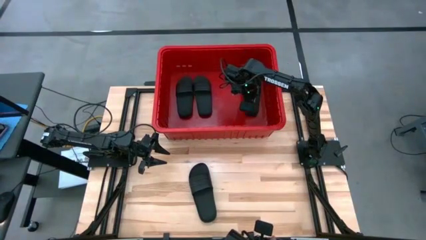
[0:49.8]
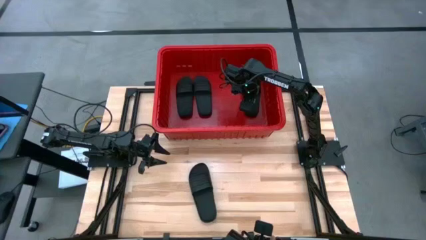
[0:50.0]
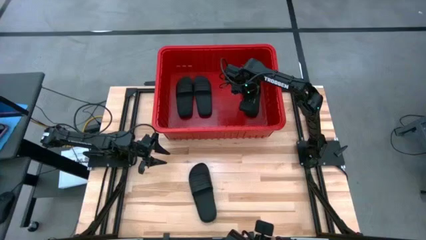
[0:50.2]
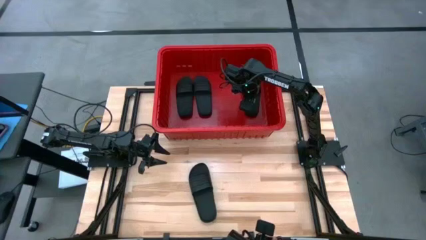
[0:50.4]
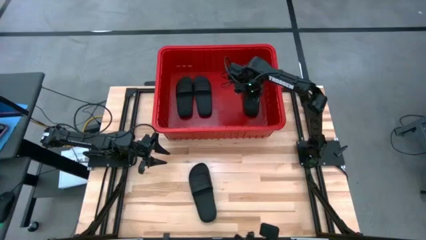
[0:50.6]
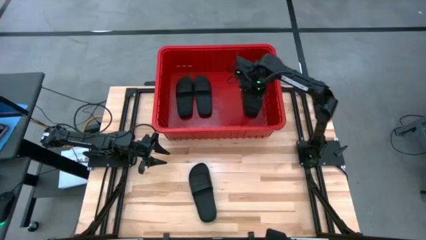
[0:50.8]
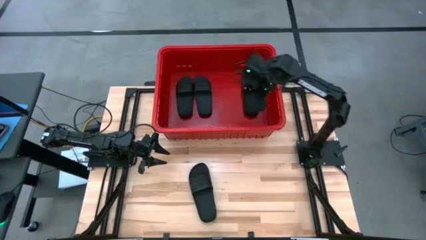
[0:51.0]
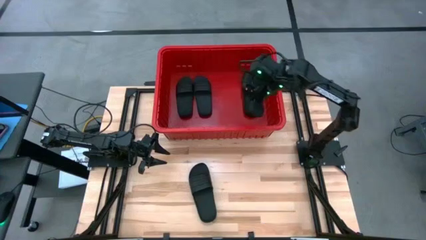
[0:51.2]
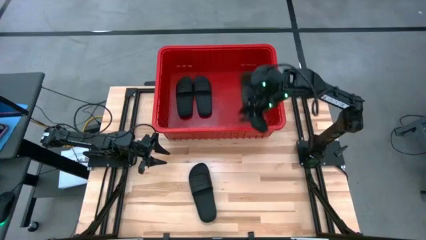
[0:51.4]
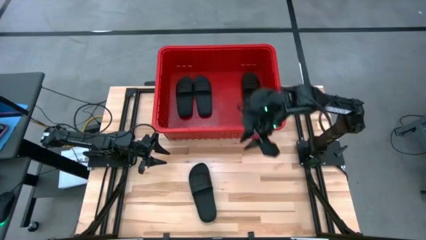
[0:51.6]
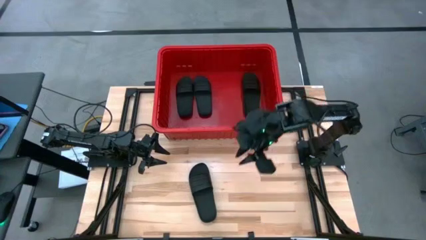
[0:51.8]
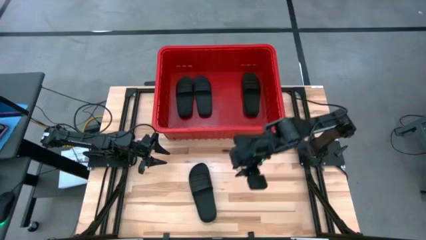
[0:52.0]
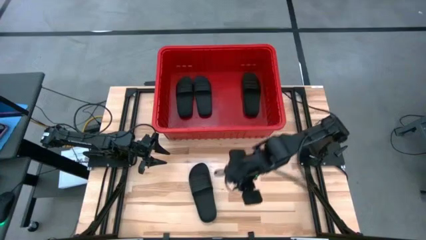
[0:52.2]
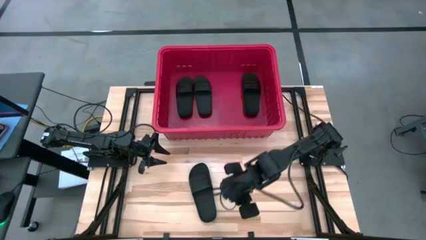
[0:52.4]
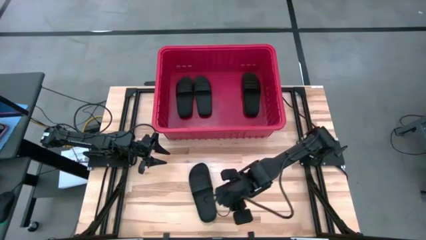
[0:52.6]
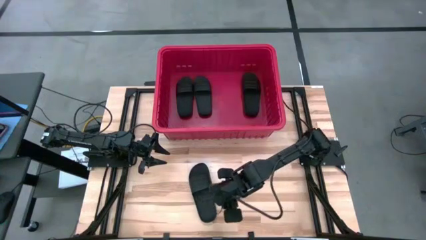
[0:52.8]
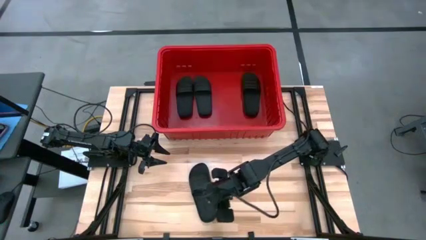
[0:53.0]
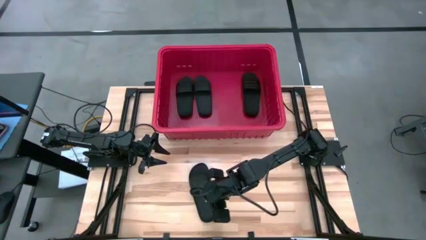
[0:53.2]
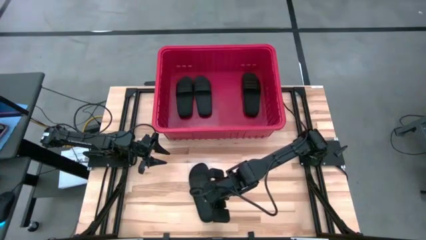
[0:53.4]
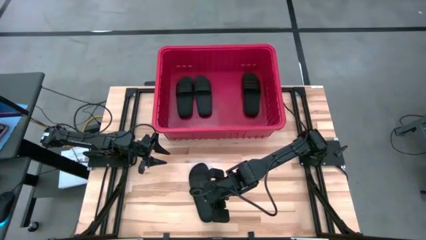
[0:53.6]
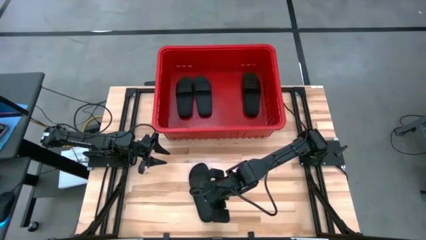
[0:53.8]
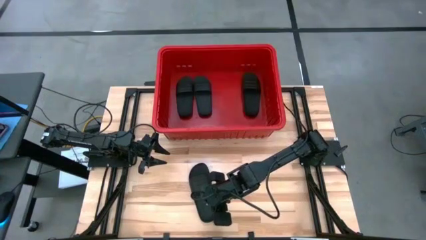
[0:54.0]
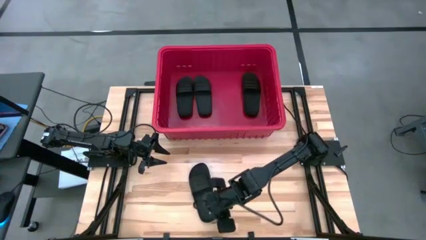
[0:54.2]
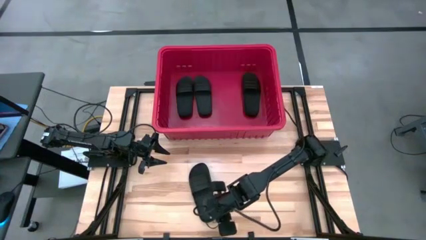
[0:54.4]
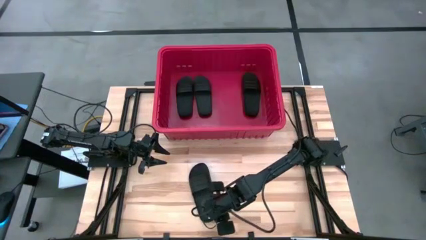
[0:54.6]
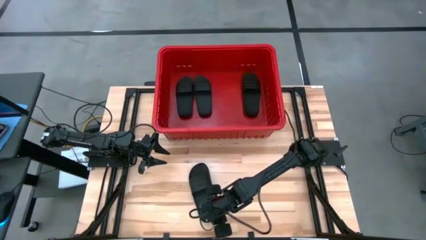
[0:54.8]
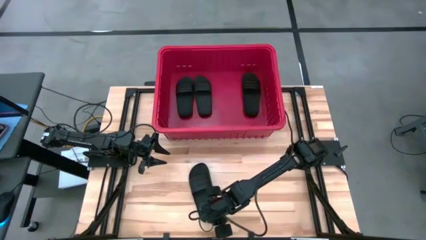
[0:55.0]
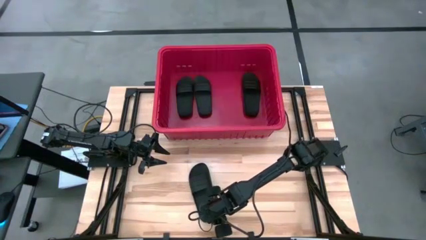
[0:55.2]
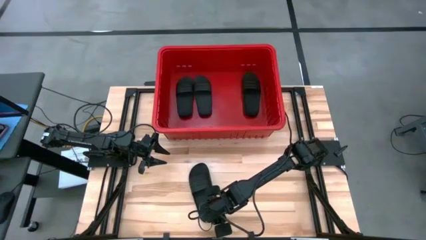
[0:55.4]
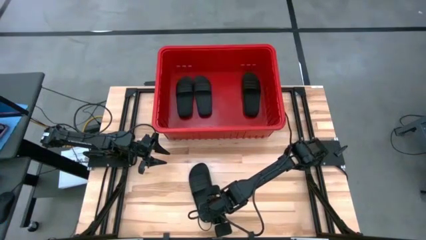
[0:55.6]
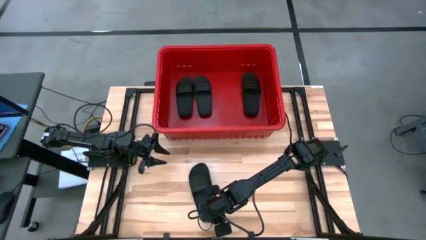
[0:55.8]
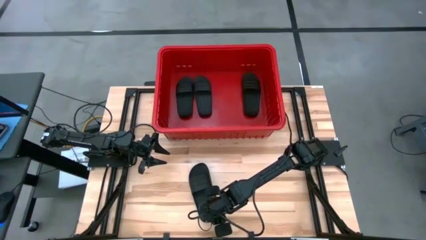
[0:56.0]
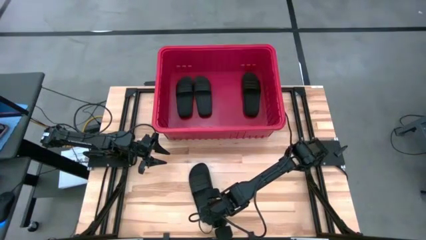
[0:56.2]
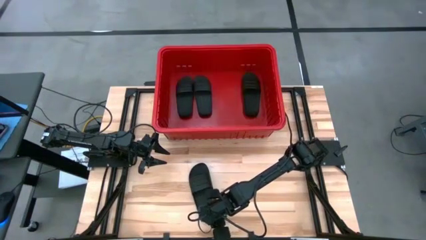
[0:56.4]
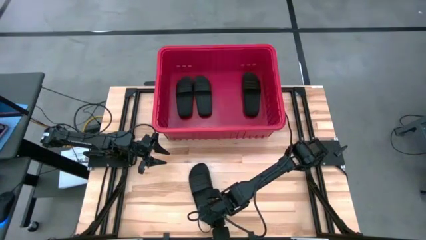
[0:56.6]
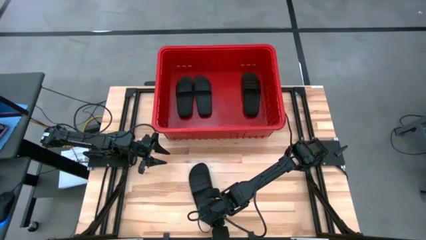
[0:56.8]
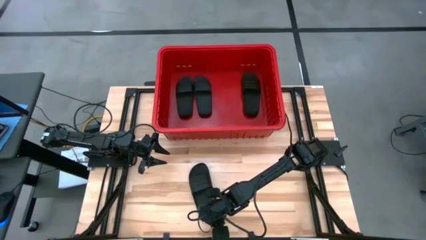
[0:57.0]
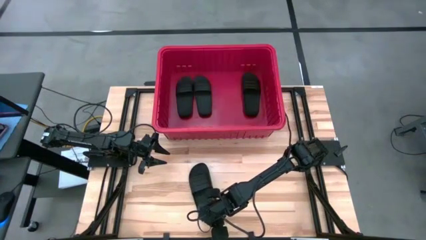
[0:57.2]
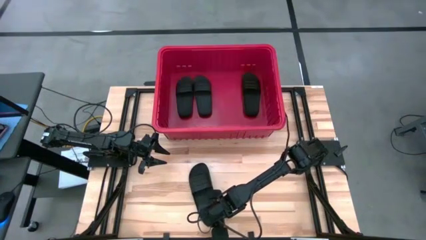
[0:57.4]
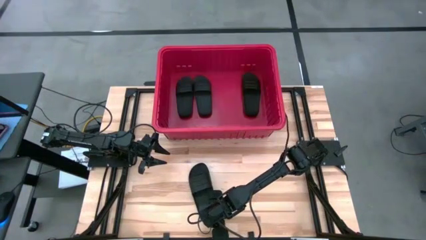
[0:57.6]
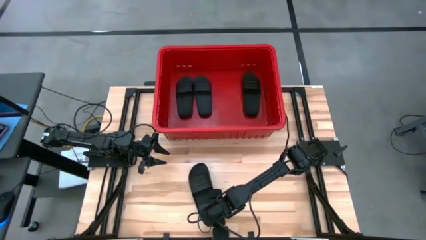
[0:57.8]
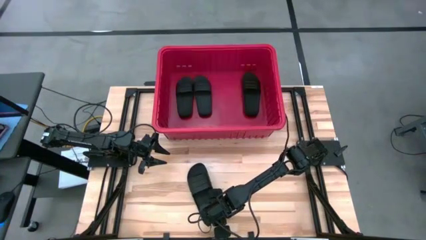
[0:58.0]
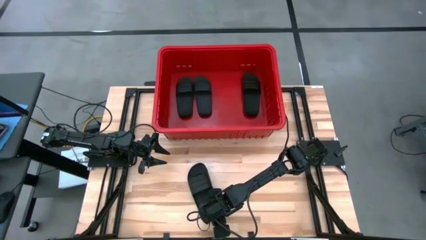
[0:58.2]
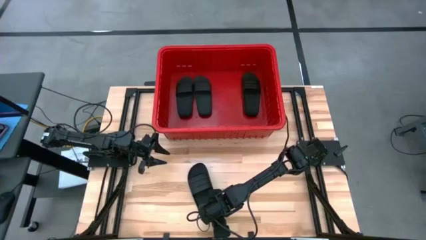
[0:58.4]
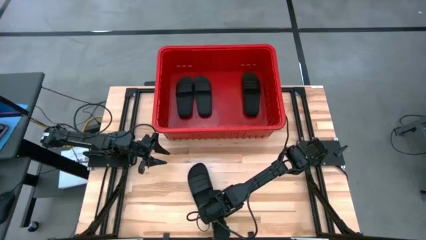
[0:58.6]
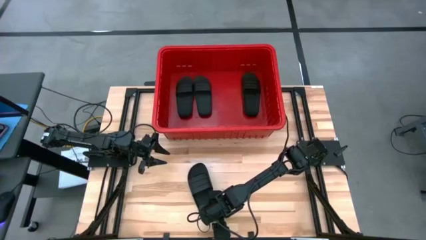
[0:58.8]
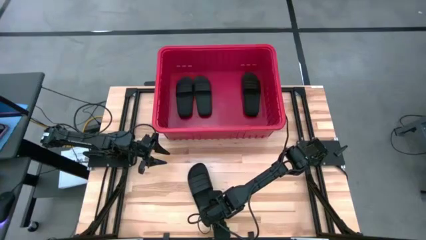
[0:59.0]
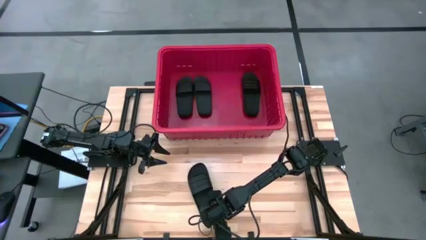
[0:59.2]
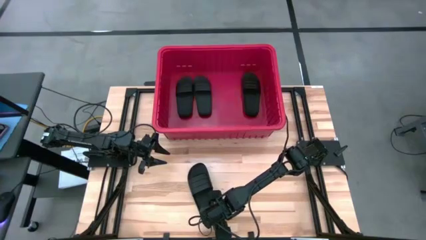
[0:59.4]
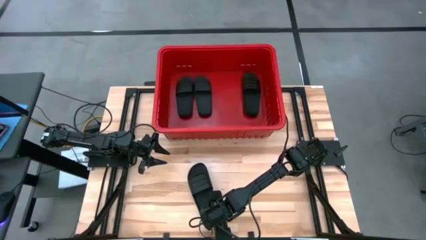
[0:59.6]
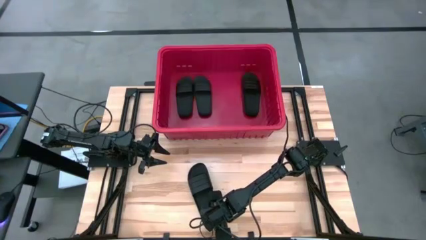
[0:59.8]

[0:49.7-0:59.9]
Task: Pick and place slides into bin
Put the black slide into the red bin

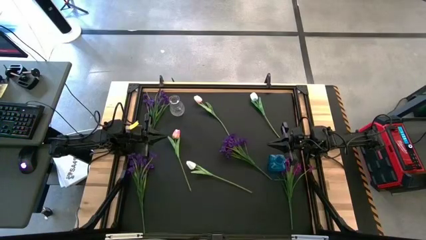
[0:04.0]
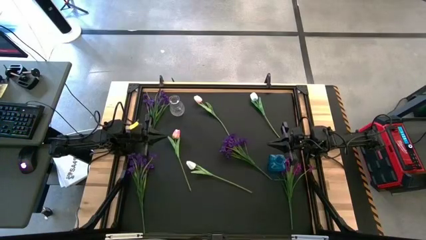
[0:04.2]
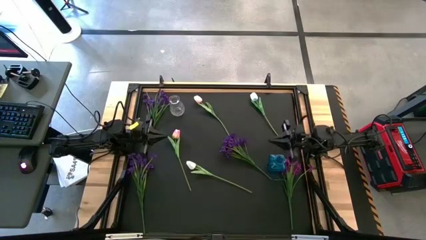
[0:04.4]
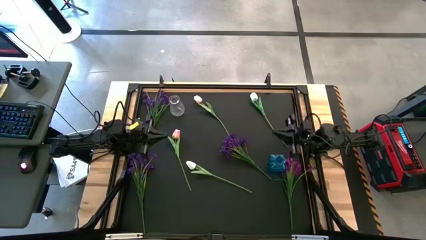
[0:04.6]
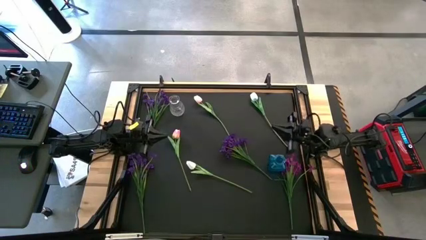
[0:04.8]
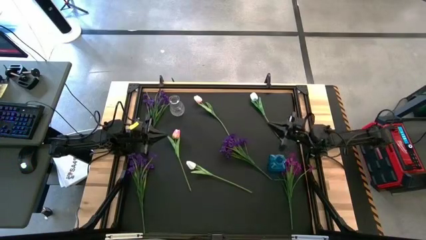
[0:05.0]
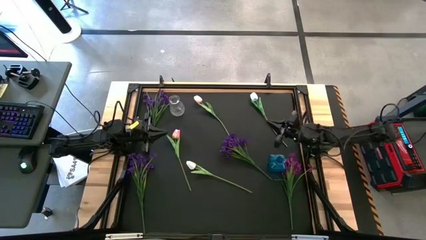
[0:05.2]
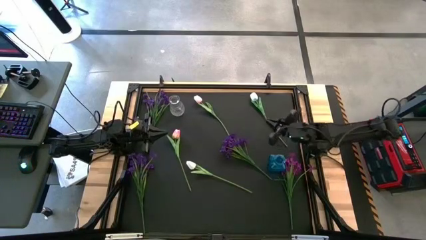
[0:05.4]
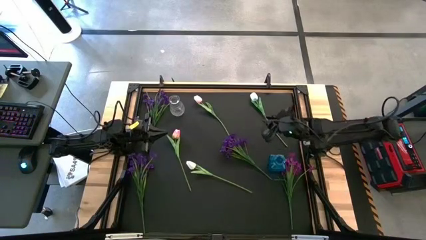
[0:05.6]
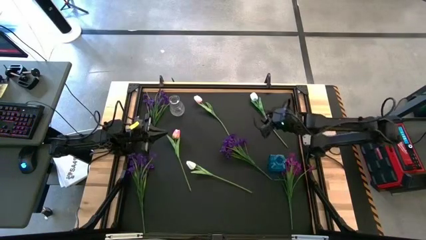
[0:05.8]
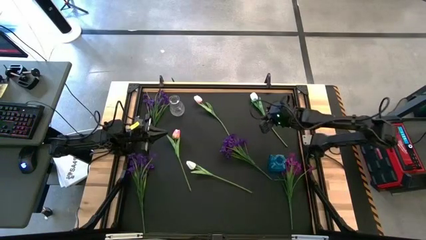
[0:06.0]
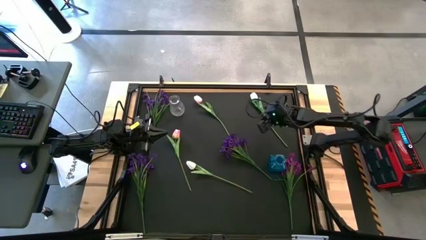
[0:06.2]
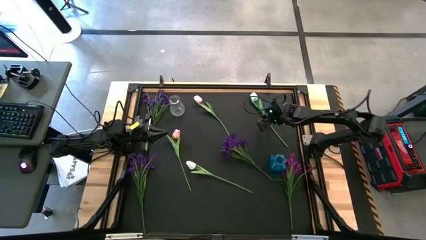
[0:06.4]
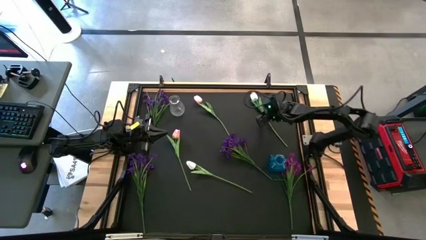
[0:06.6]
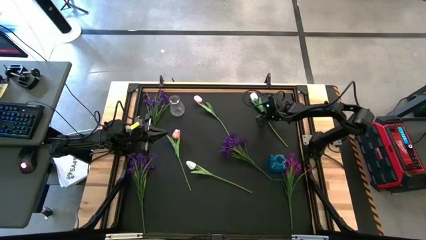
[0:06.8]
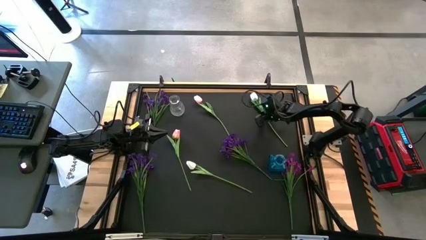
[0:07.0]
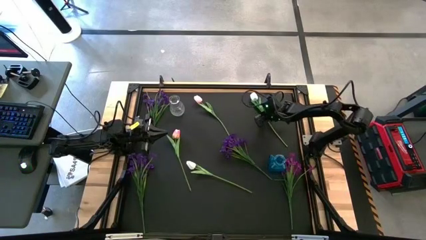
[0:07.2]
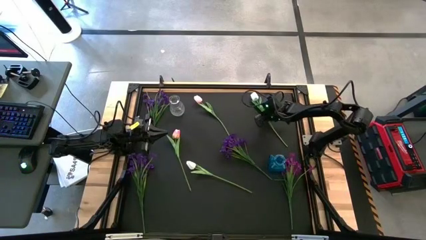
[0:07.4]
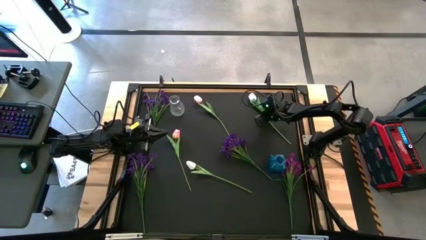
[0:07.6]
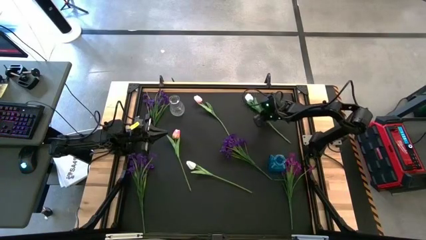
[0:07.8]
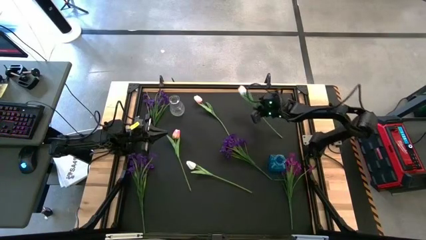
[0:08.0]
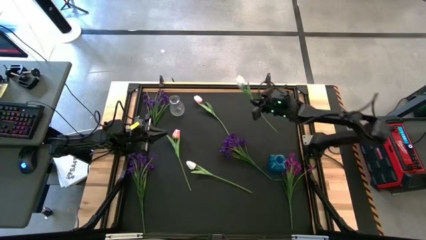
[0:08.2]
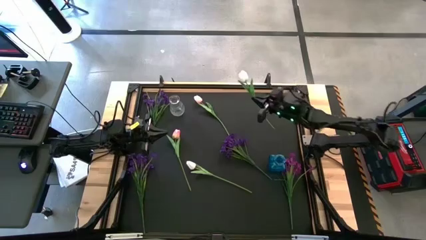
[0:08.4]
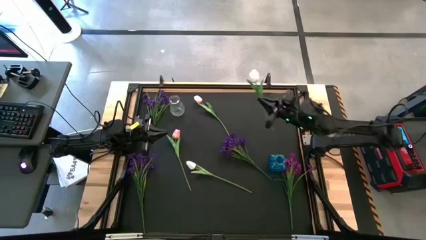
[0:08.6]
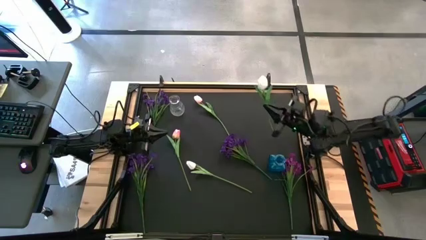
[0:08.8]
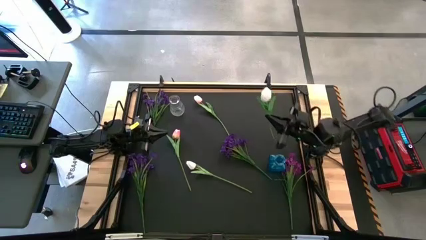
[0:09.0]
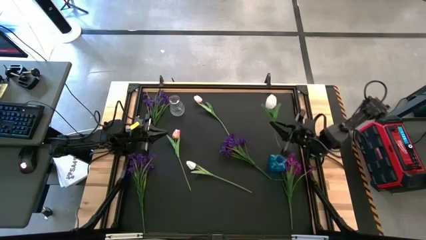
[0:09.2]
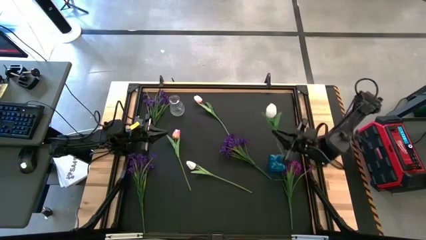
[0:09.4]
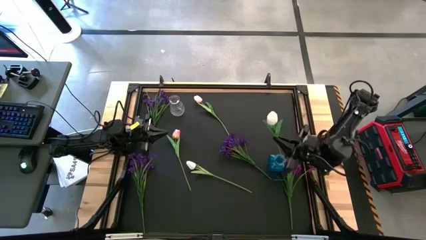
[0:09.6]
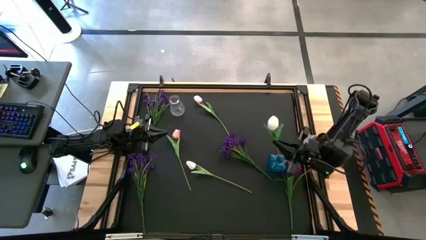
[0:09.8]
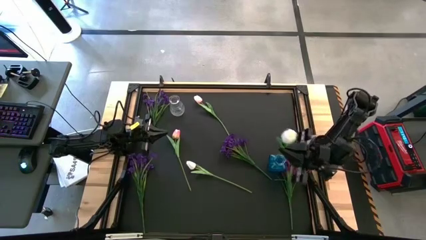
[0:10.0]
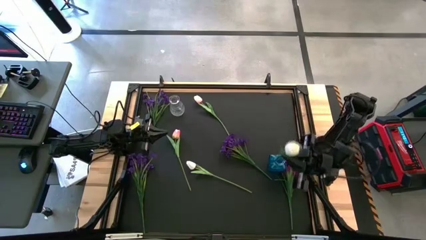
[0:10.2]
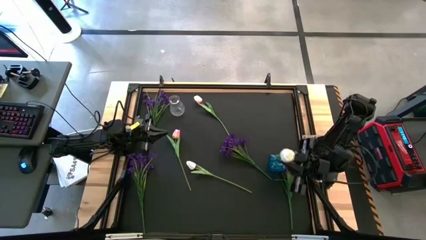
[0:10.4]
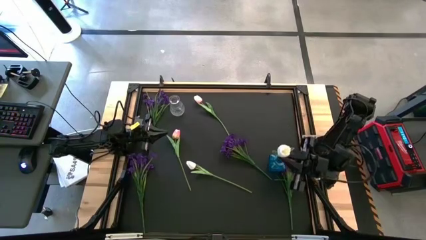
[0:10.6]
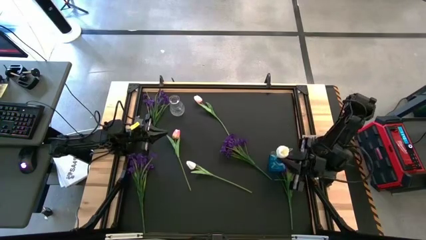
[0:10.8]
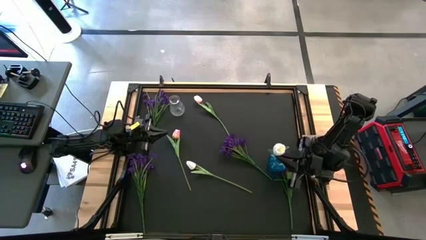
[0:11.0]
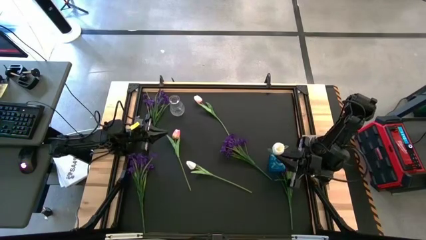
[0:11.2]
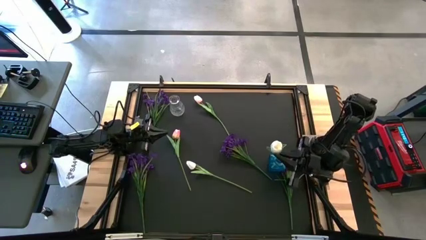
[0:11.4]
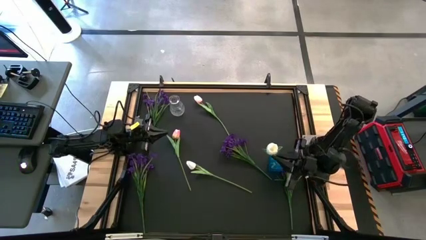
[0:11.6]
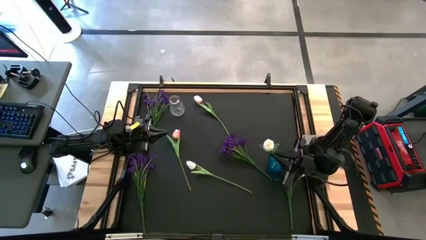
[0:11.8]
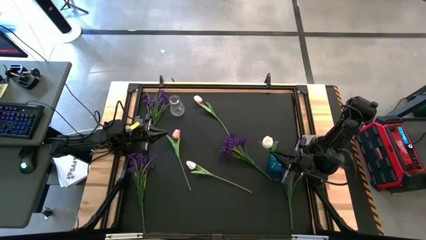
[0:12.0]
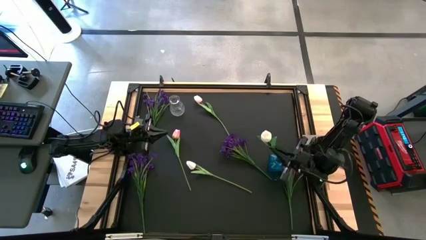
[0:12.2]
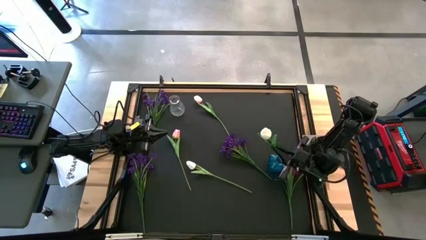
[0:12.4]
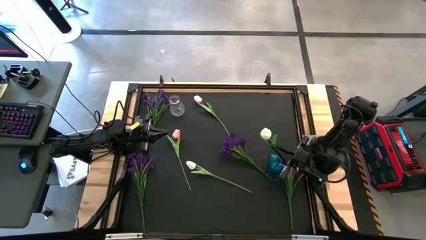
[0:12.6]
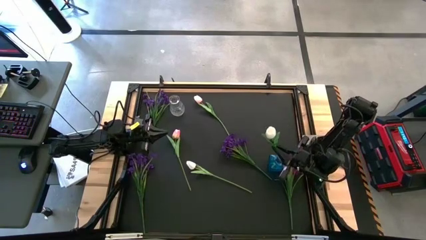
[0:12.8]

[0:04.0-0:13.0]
Task: Sort flowers into vase by color
Put the top white flower into the transparent blue vase
